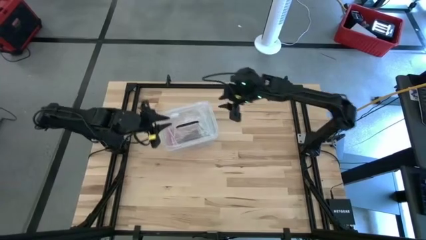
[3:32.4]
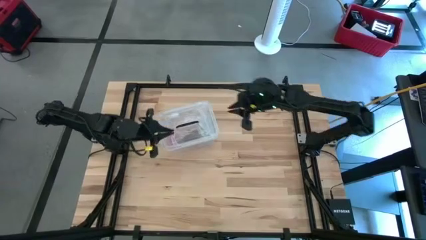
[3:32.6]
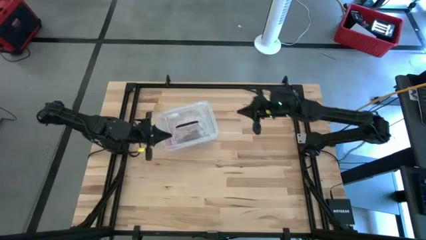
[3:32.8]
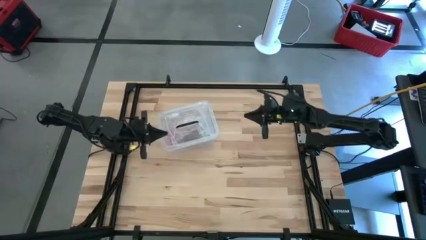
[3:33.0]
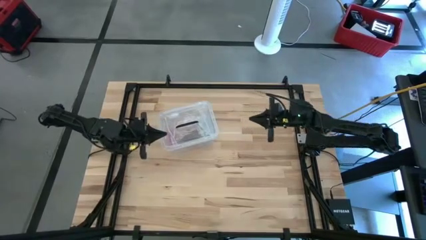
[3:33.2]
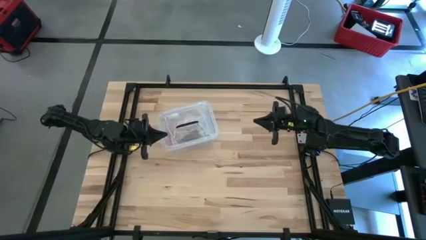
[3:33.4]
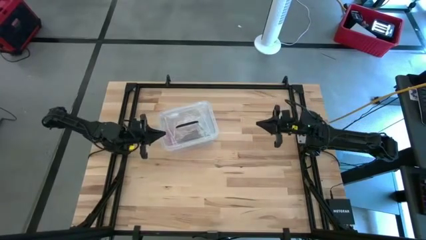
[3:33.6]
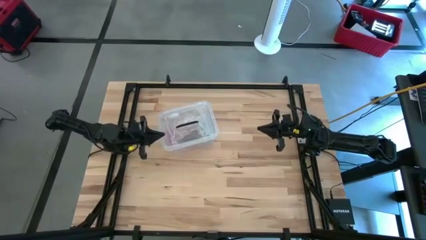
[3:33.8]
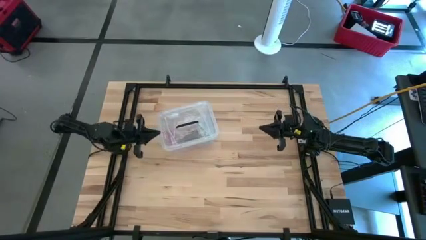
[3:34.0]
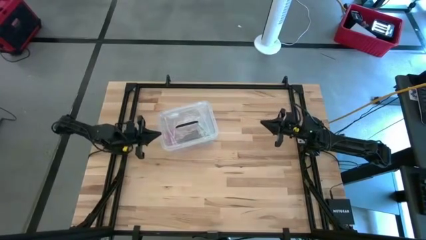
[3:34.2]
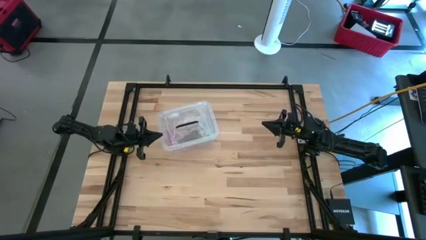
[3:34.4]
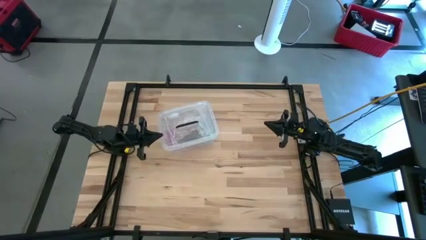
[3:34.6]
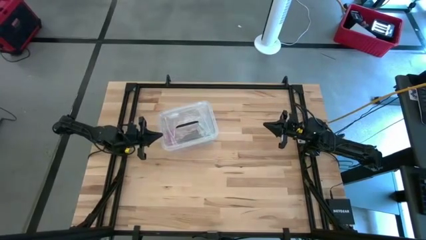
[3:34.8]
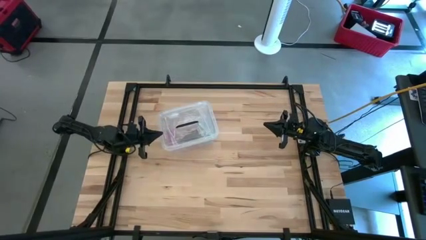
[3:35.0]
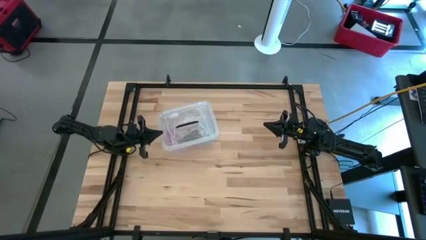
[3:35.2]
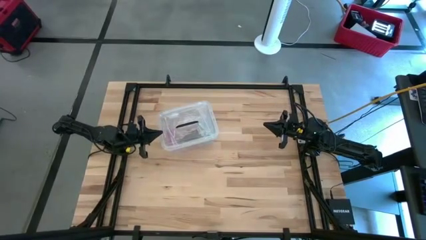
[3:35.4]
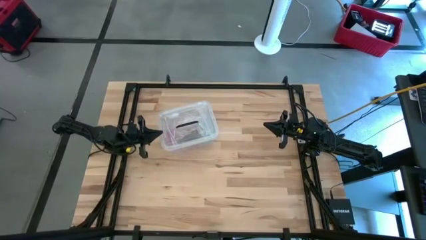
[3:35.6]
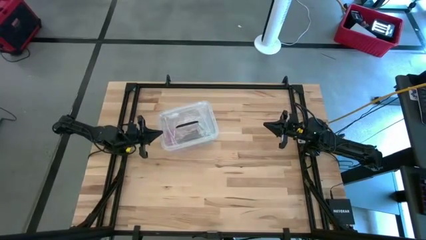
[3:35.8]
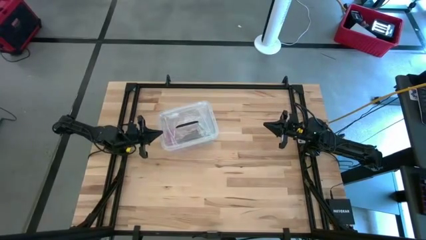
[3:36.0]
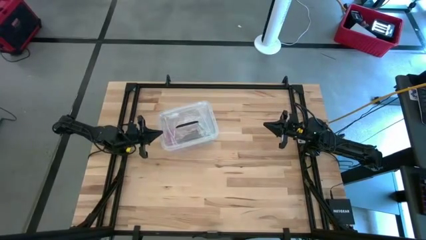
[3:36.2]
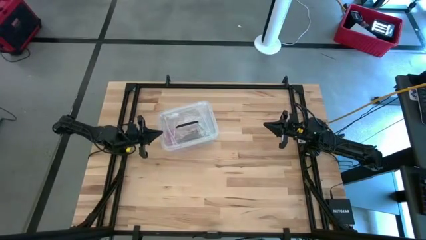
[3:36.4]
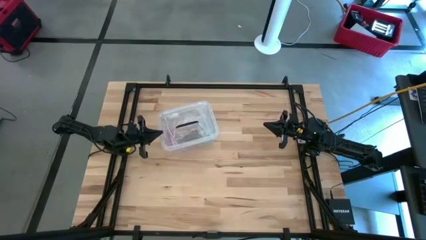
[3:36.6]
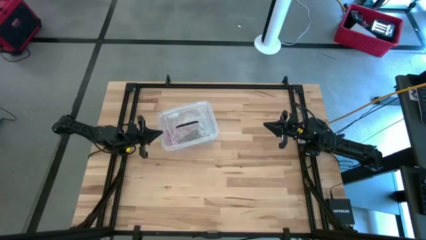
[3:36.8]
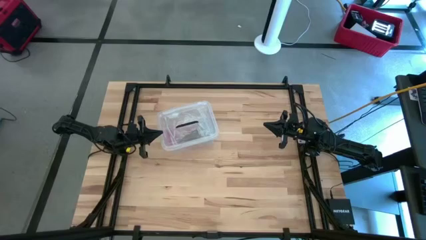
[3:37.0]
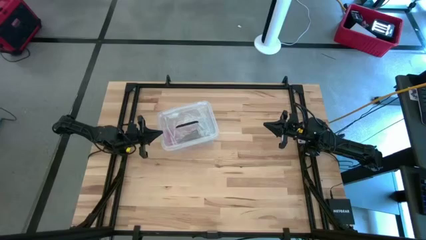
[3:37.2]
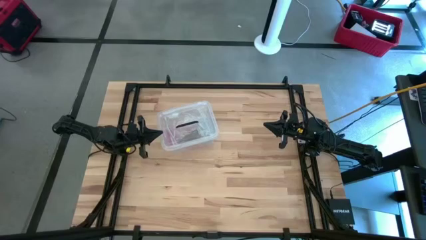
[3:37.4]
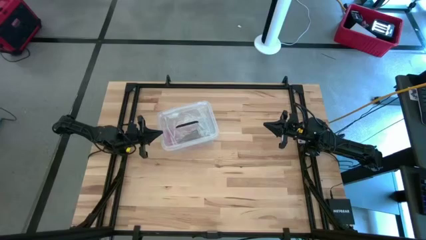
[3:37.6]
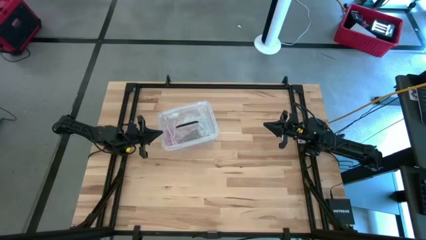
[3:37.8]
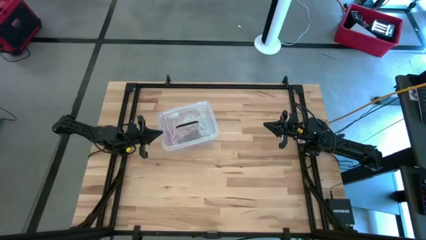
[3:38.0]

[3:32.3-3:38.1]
Task: Roll bandage
Return to Home Position

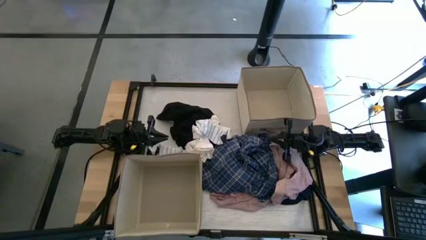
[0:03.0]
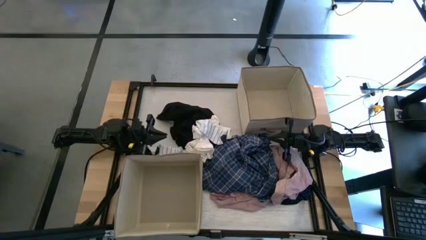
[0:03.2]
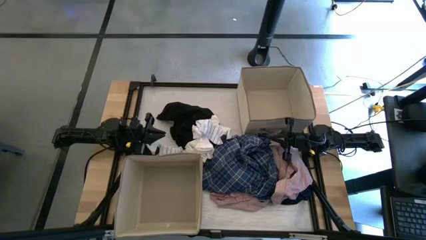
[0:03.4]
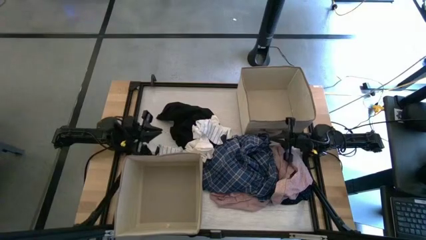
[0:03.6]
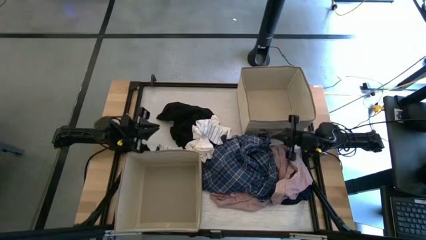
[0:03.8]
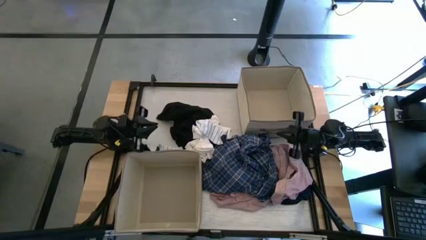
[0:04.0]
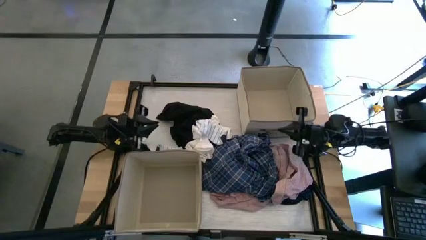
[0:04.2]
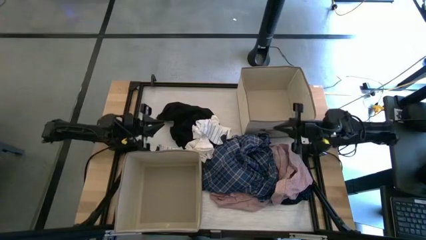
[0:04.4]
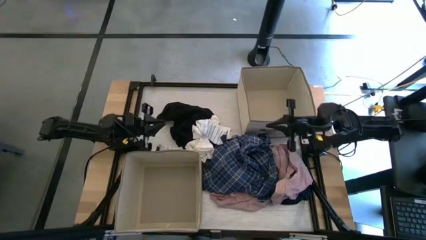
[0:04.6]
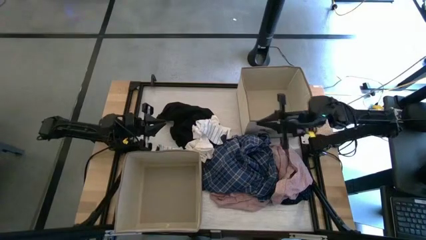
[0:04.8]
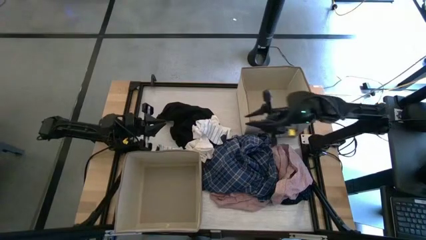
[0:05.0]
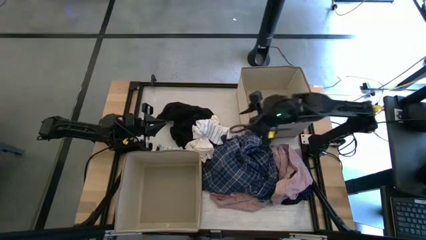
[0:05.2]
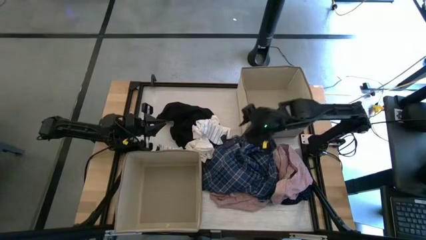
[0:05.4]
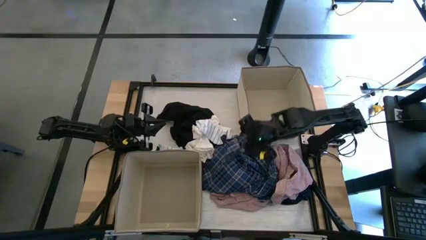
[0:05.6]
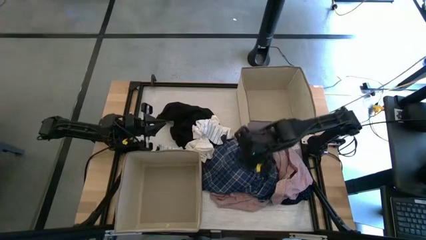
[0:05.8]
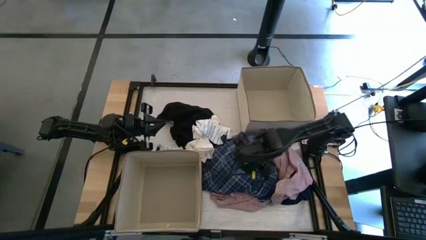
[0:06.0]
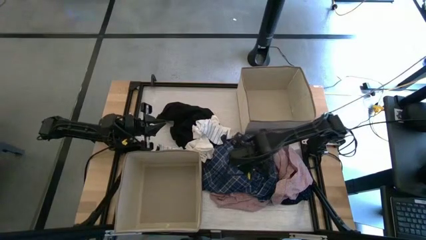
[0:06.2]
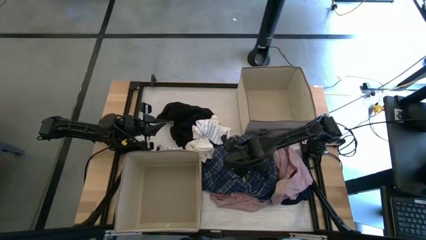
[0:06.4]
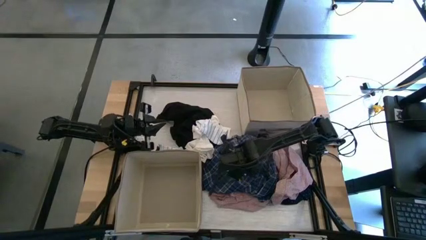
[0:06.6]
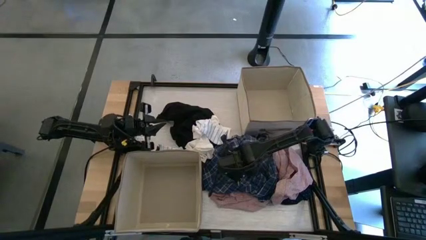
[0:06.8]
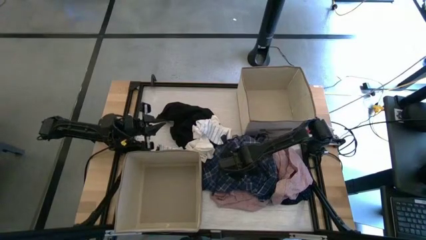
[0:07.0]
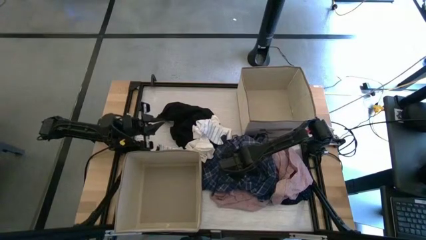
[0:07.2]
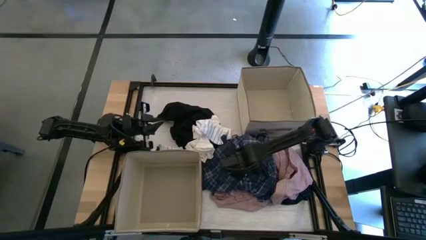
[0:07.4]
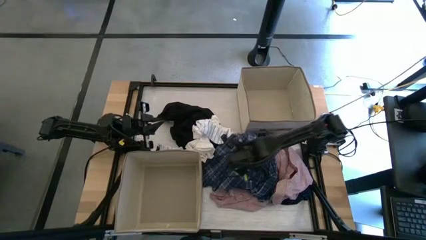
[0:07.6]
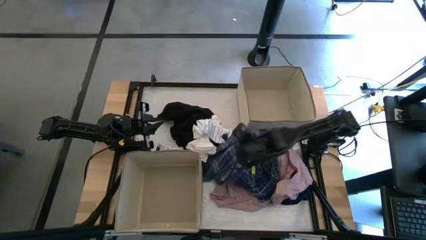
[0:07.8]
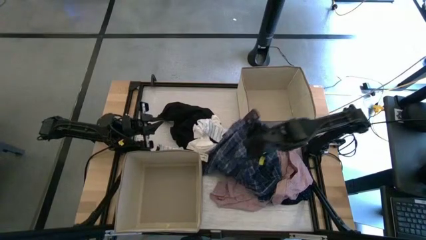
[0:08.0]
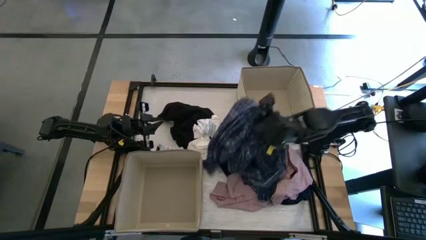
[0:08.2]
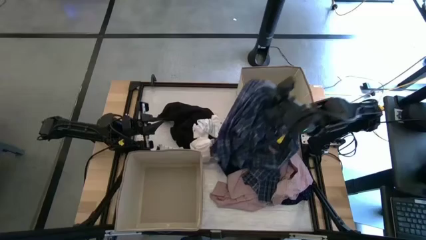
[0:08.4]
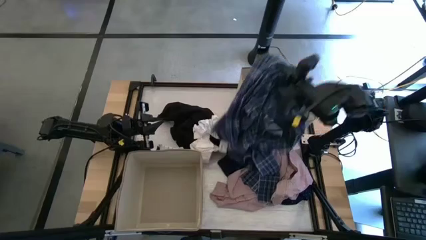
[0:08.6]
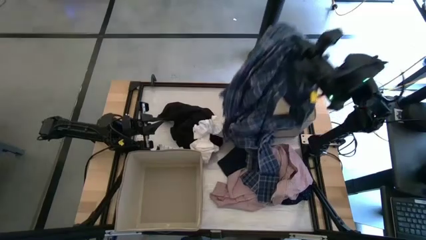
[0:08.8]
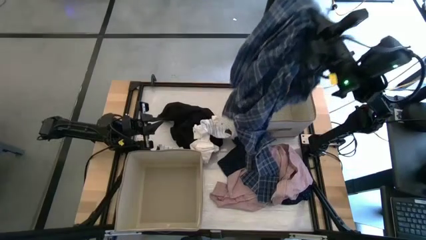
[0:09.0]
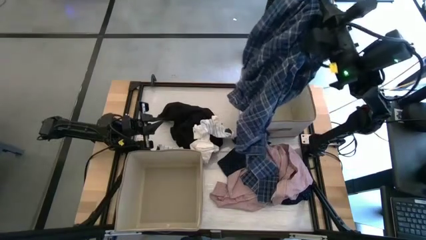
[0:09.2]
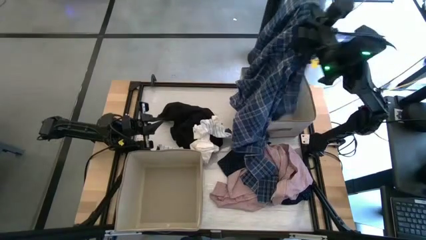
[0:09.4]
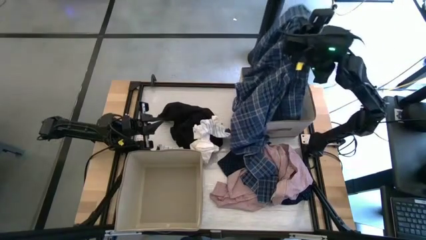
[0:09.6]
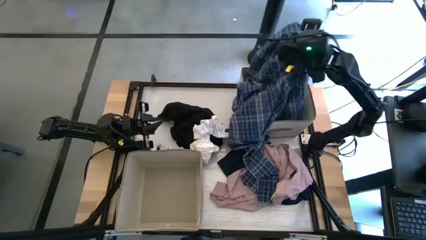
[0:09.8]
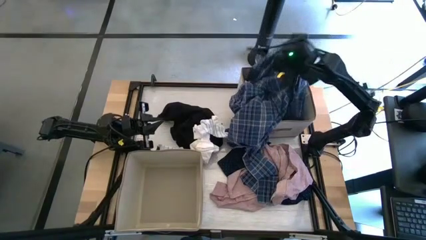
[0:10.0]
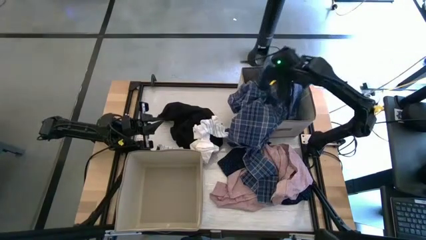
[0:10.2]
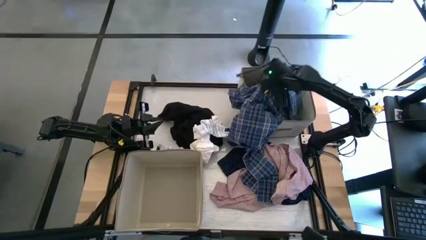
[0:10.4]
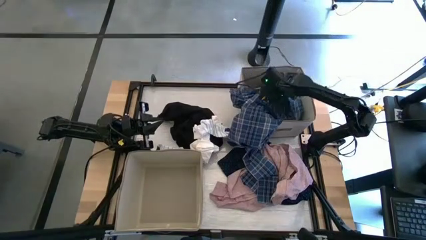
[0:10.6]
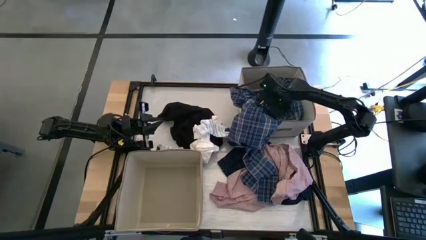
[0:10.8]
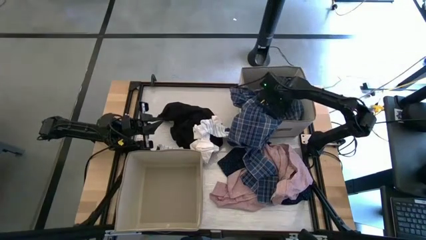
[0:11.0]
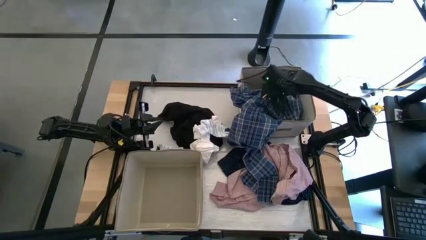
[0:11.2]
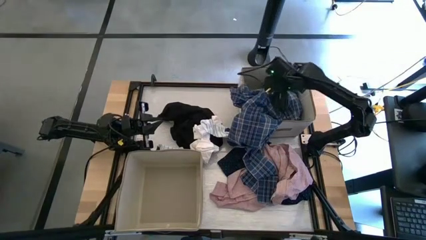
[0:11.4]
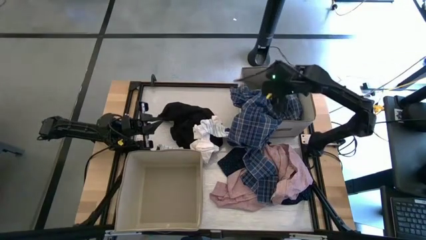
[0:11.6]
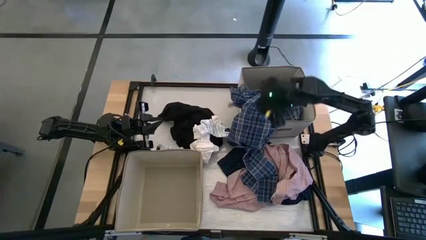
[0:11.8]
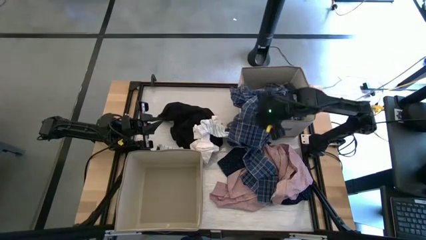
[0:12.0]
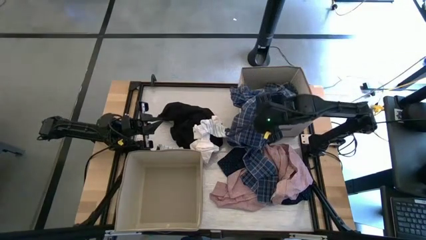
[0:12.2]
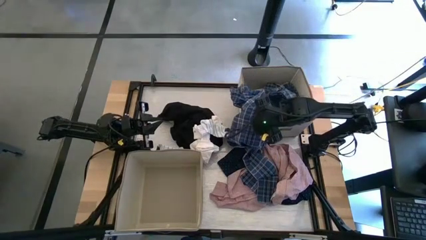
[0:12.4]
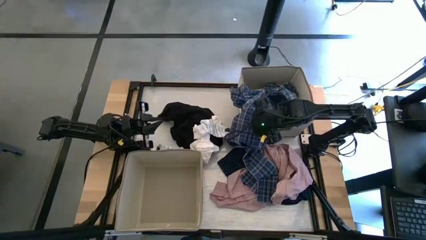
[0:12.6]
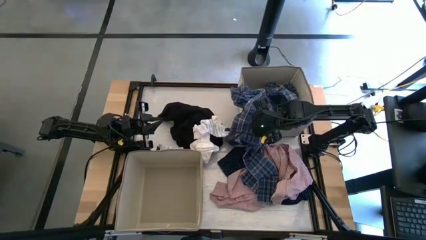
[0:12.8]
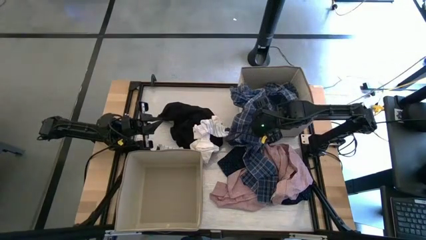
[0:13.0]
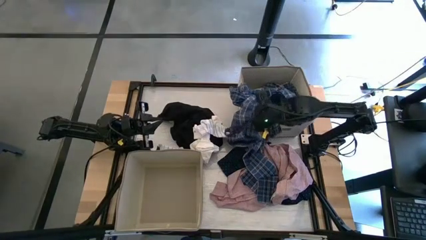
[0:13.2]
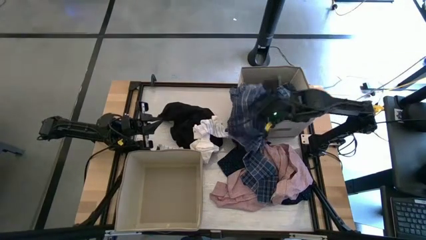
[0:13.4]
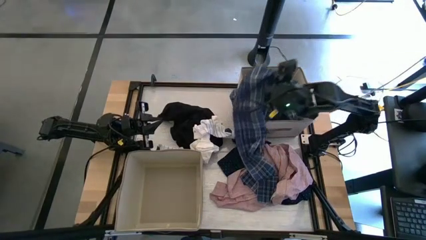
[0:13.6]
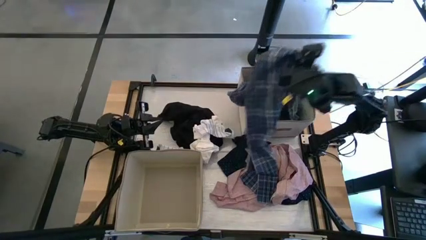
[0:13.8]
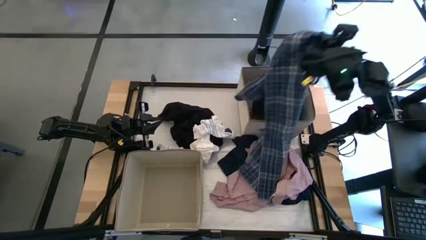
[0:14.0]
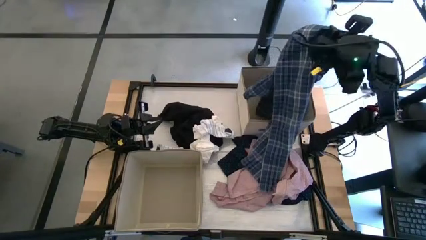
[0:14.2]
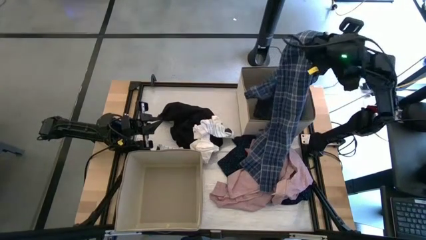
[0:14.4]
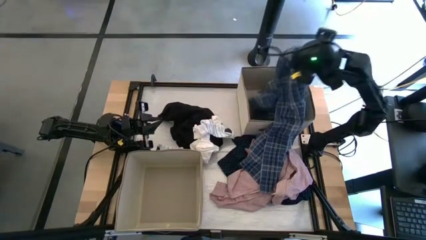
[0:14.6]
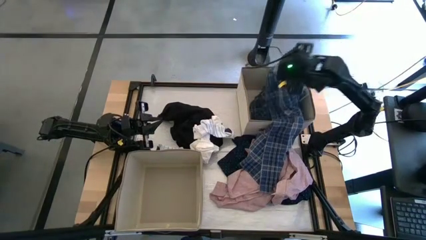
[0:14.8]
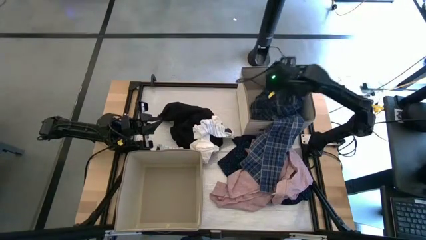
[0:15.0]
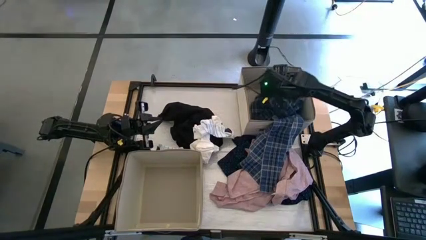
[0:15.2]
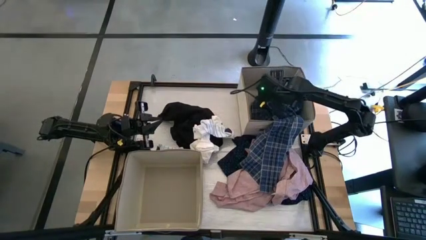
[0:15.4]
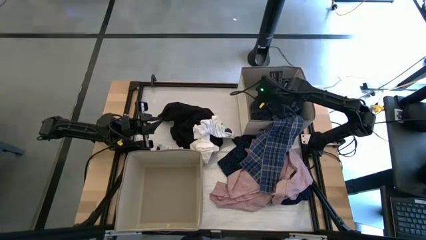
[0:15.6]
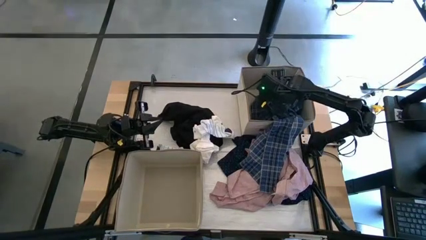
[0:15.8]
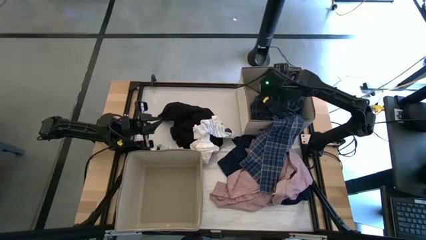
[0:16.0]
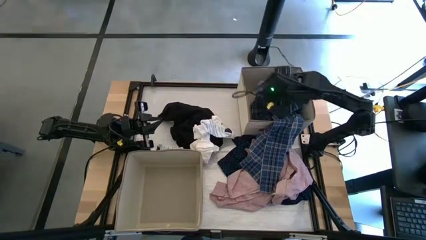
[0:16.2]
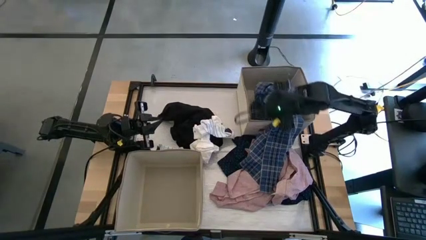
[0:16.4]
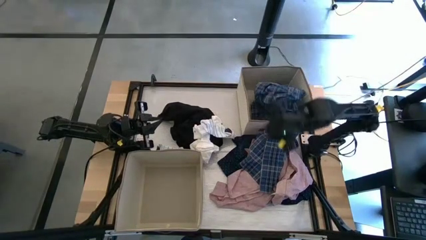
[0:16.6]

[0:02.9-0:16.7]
Task: Sort clothes
Put the blue checkered polo shirt into the right laundry organizer
